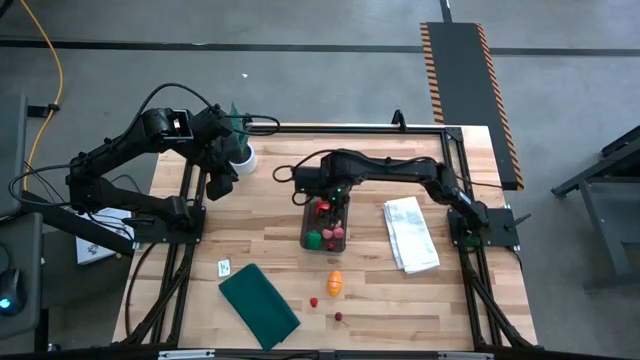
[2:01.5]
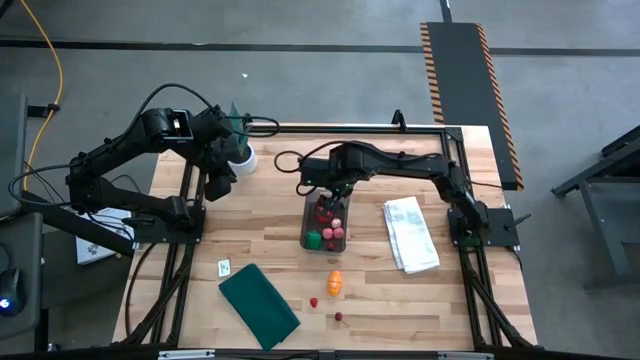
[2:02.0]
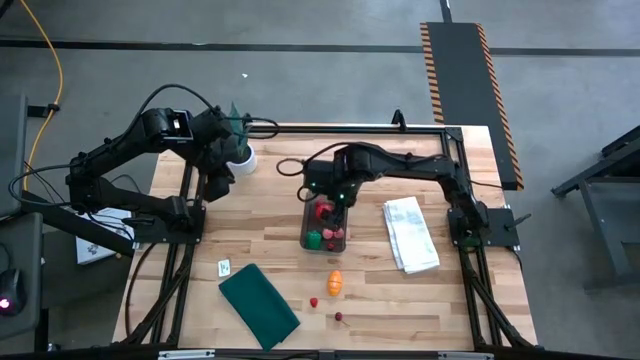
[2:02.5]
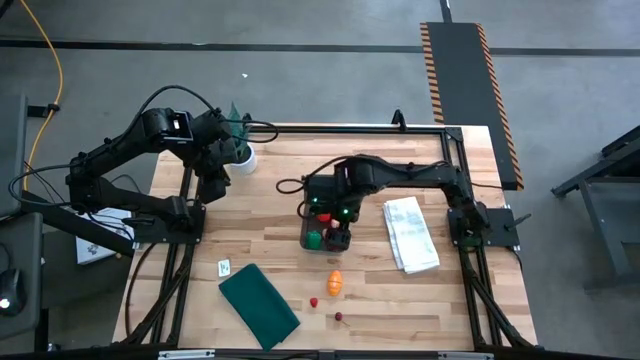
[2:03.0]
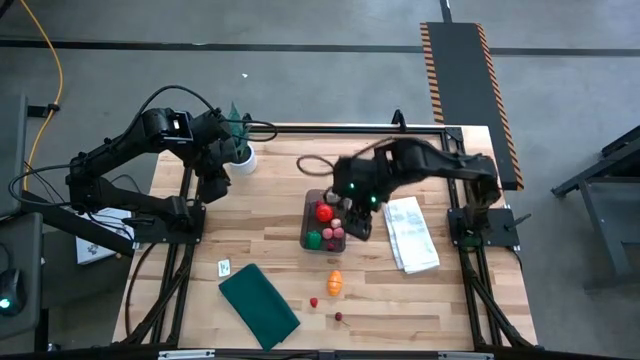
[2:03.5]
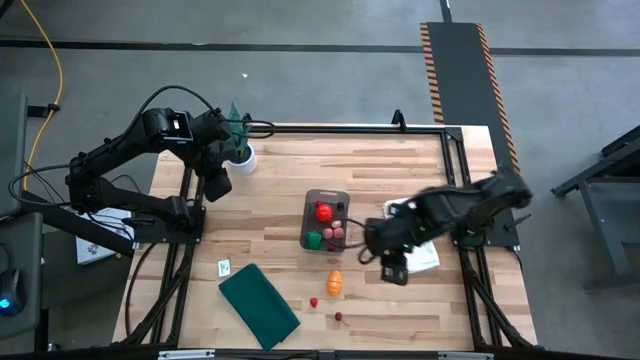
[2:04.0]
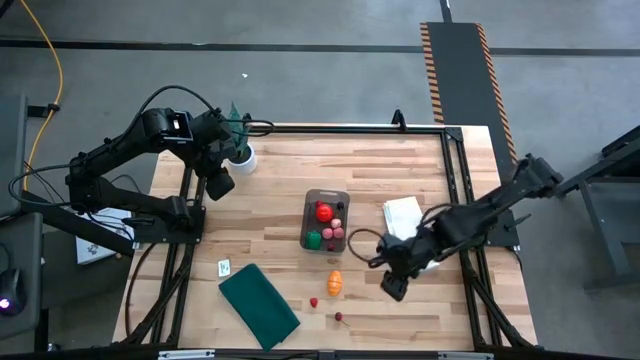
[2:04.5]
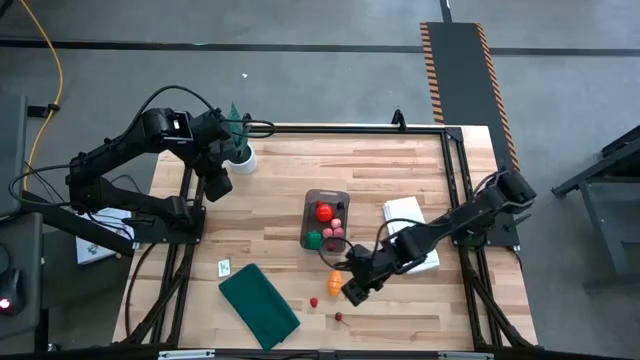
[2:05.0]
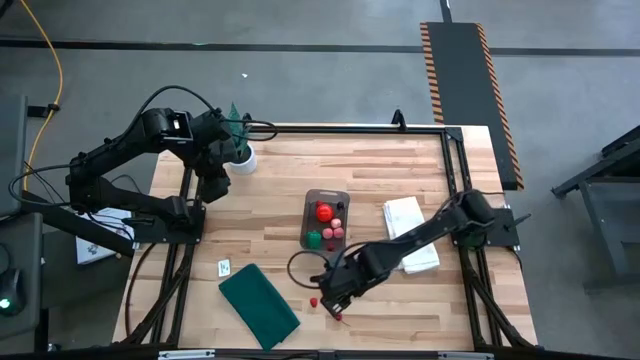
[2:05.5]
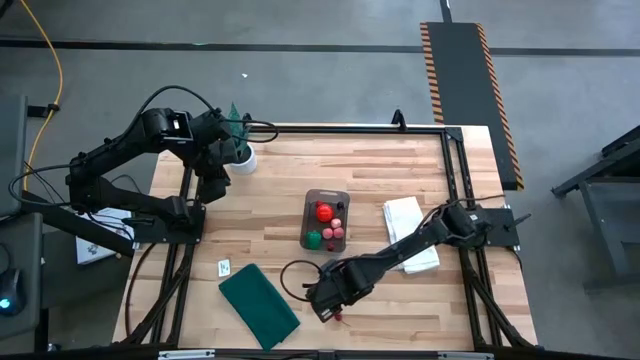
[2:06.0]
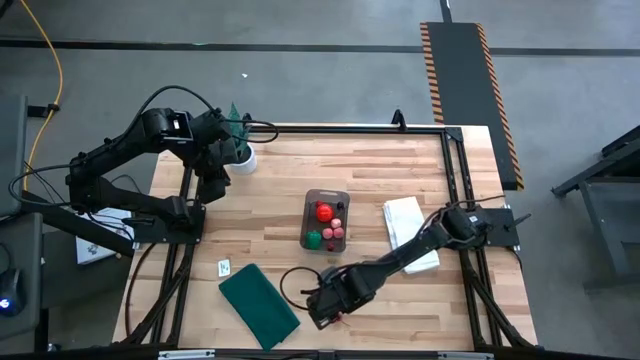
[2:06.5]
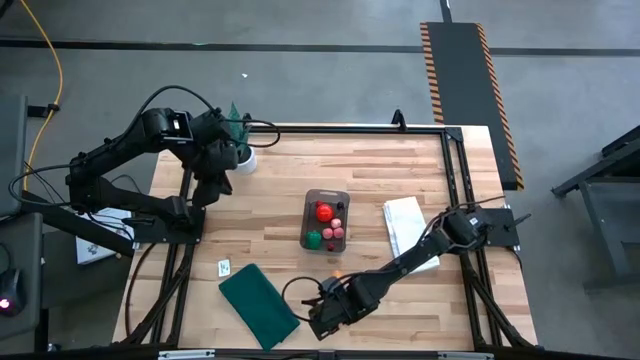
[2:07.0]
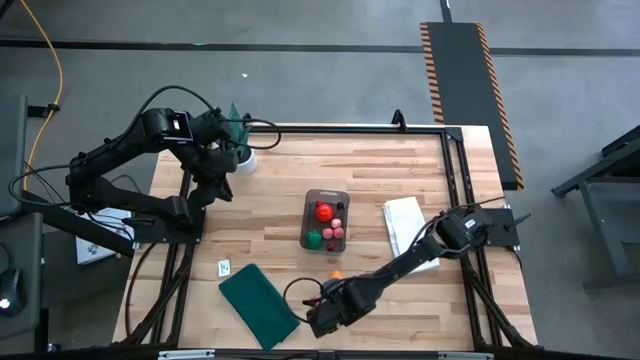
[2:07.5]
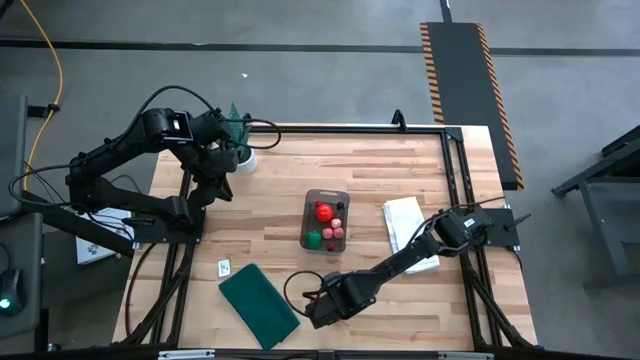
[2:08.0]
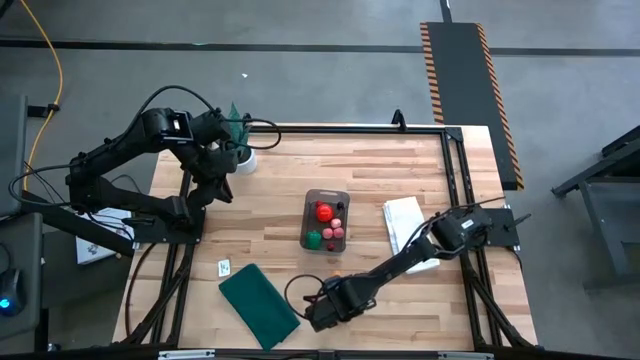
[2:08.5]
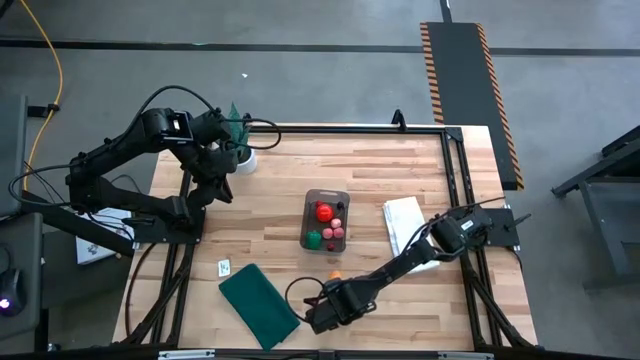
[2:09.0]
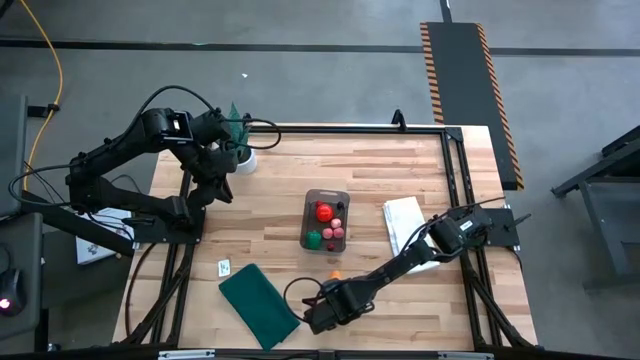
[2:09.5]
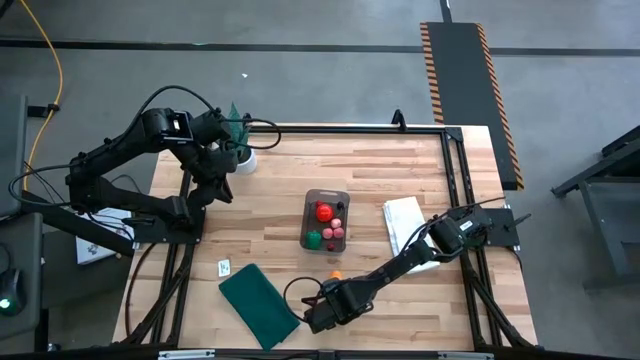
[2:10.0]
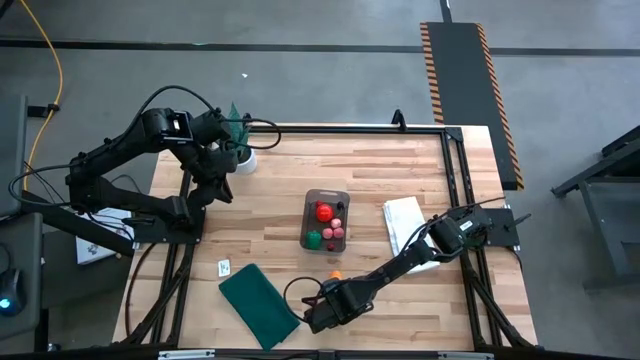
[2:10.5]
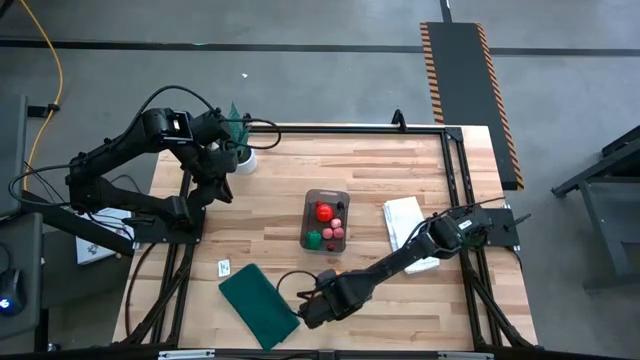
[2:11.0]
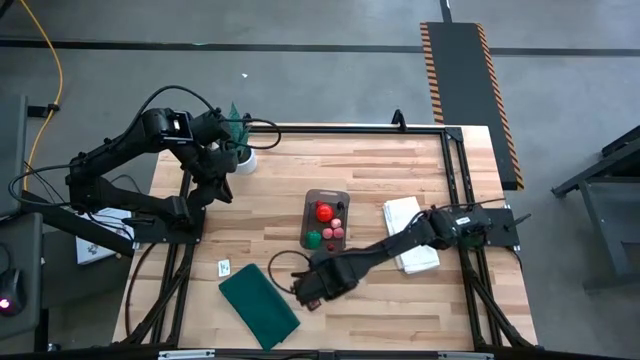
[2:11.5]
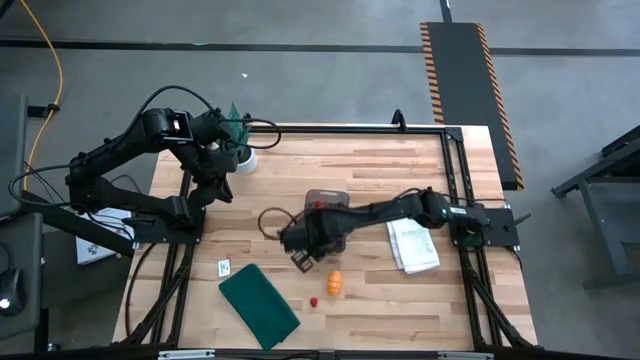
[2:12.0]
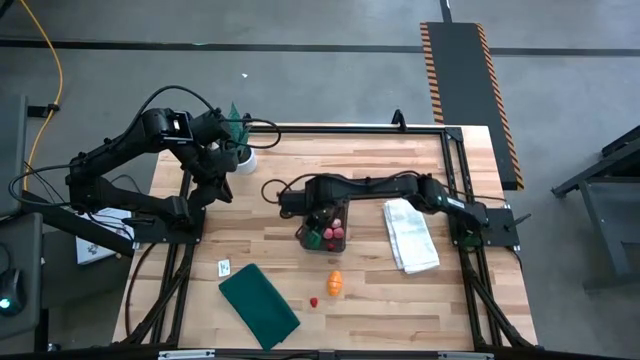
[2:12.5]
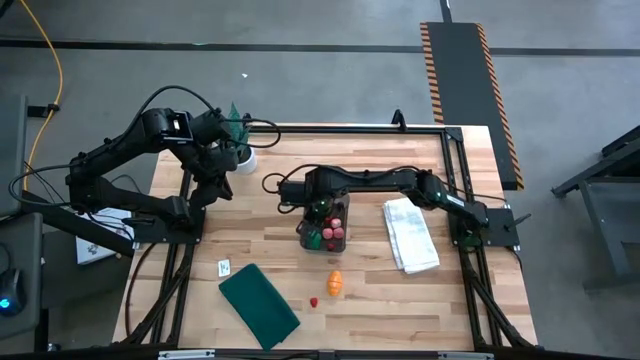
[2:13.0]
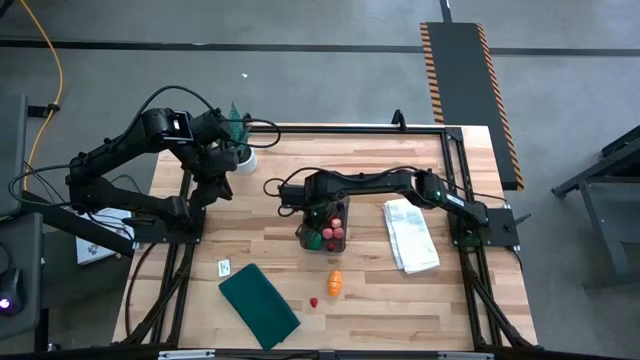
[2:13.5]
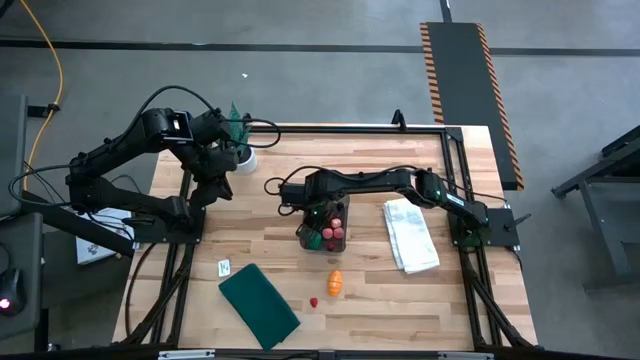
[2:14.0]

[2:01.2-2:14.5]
Task: Pick and placing Produce into tupperware
Put the red cherry into the transparent black bin

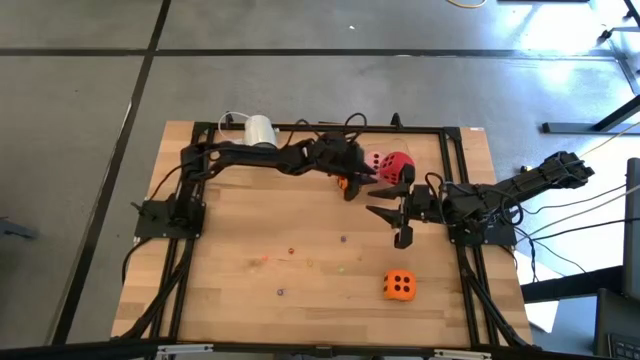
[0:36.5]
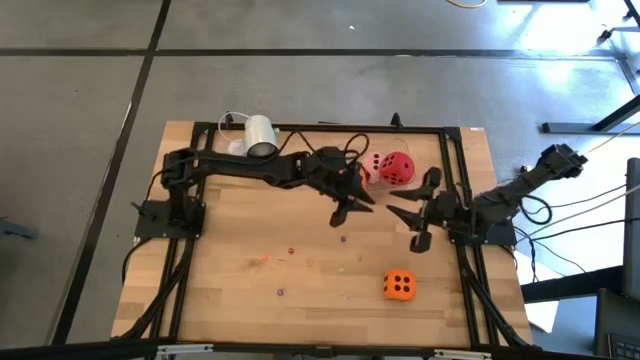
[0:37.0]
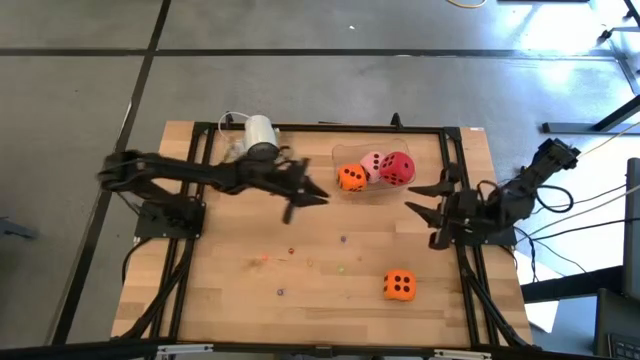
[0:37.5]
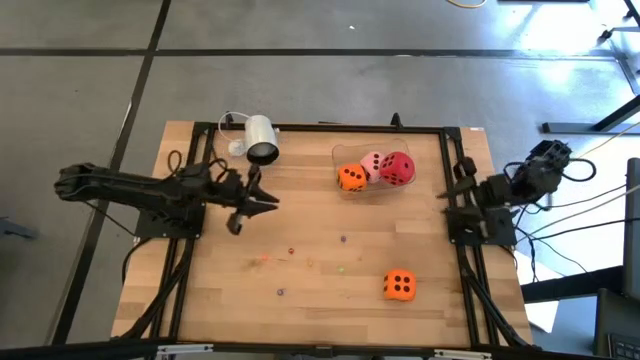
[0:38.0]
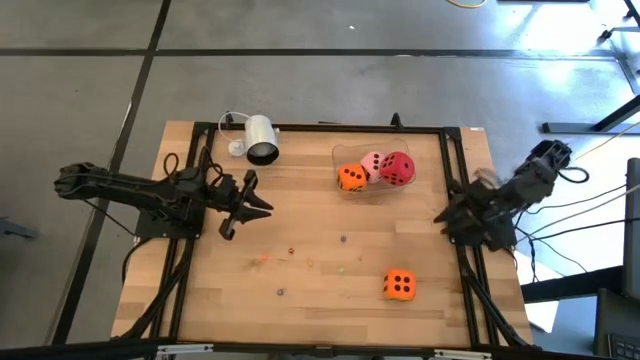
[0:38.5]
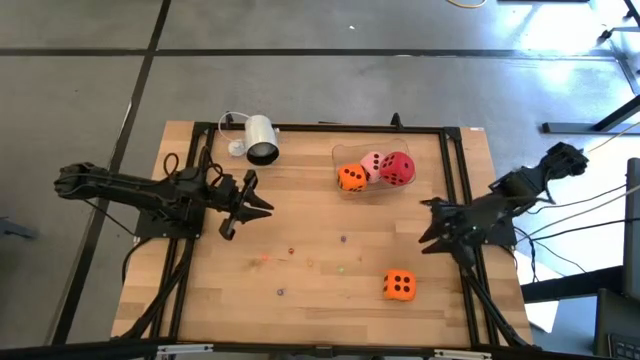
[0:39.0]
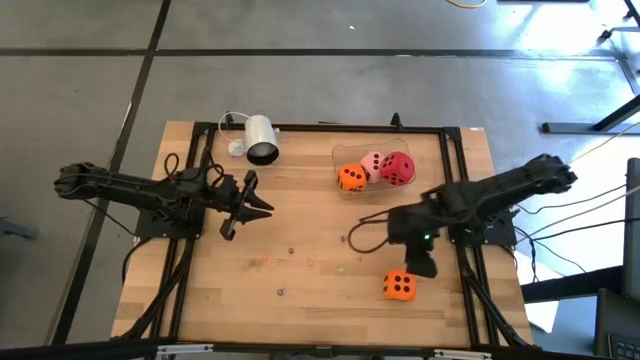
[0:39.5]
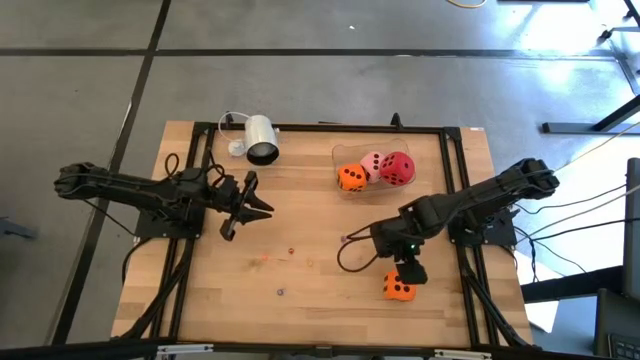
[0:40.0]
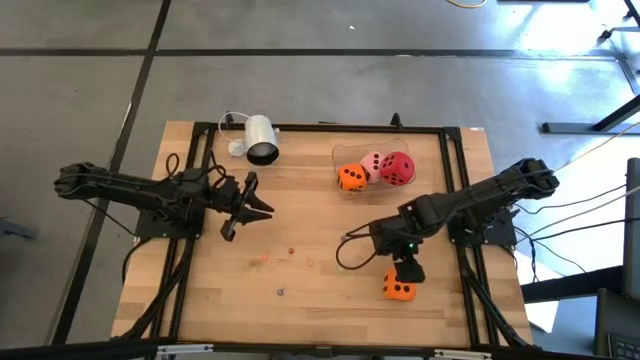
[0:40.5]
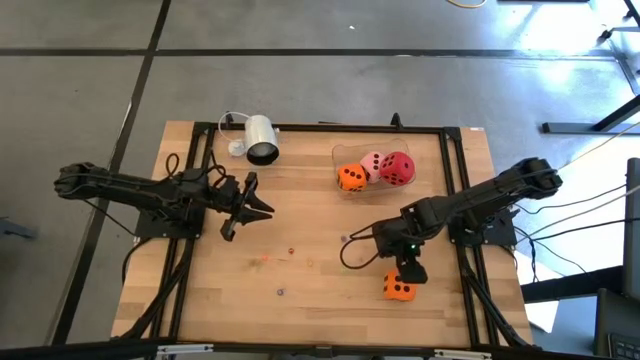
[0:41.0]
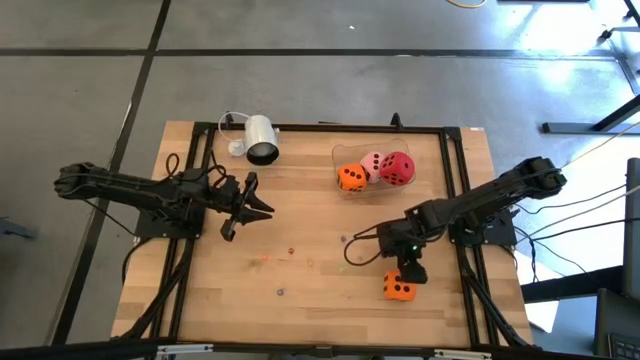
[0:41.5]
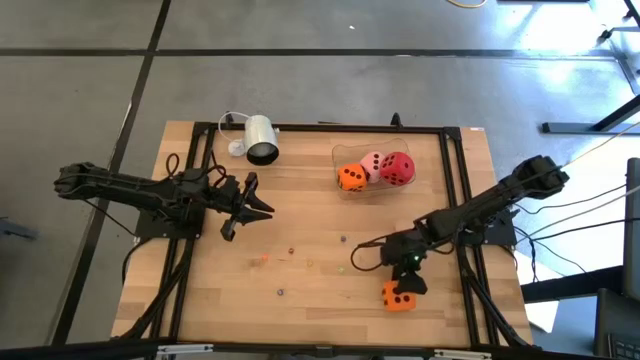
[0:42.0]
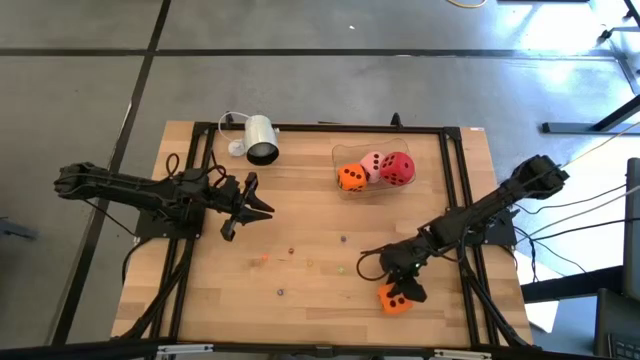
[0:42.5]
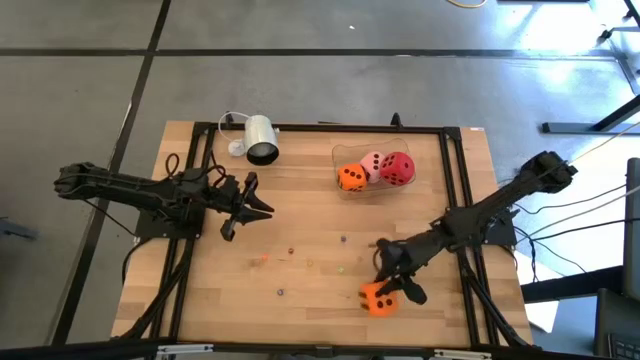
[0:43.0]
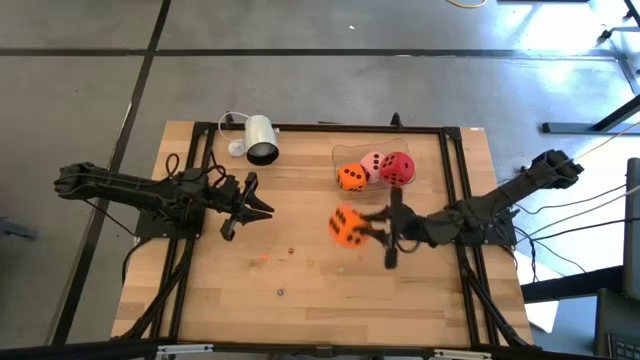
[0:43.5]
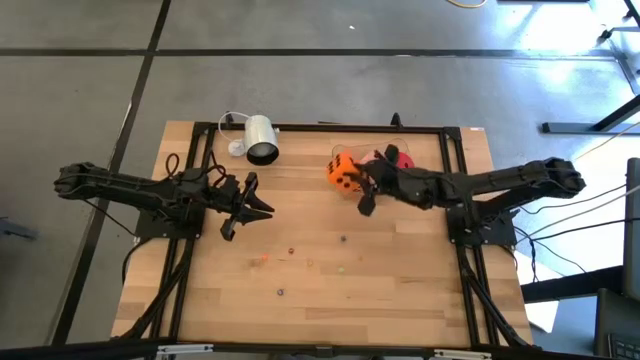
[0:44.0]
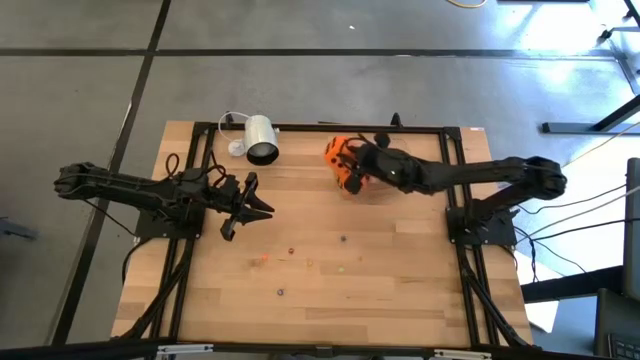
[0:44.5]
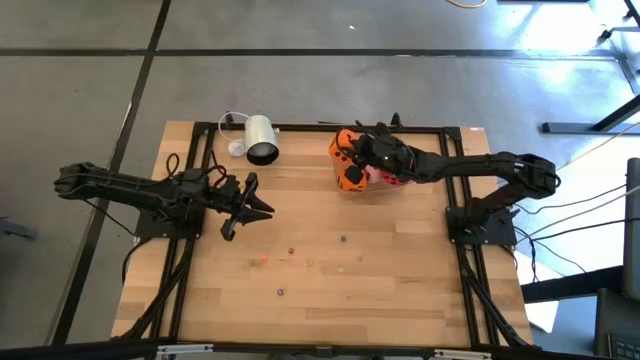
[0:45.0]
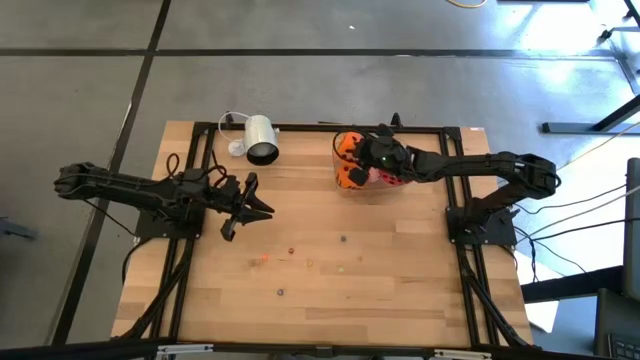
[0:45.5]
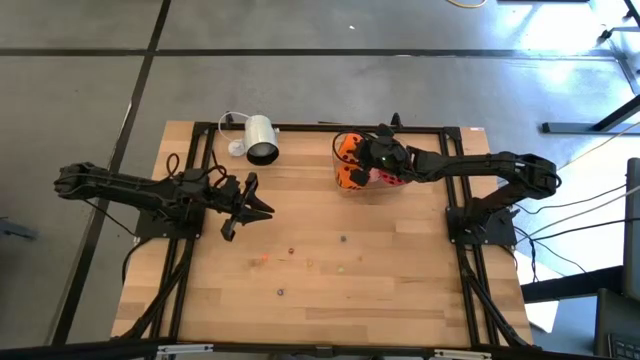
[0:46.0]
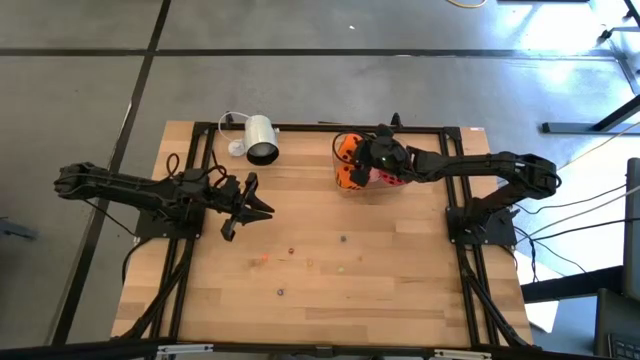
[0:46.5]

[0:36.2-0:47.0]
Task: Pick & Place Dice
Put the large orange die into the transparent bin
